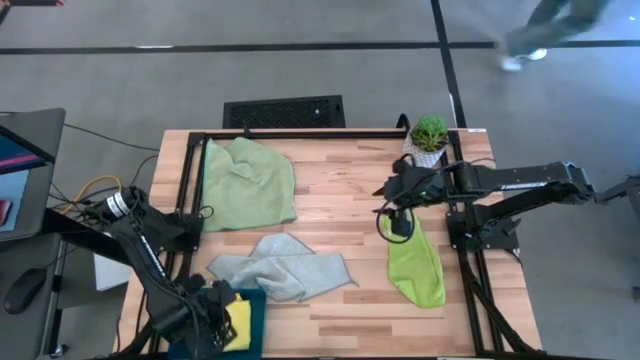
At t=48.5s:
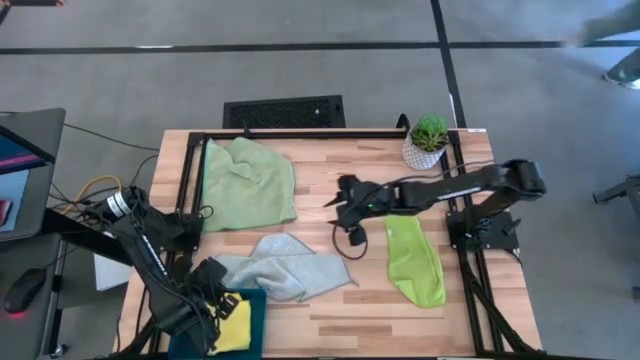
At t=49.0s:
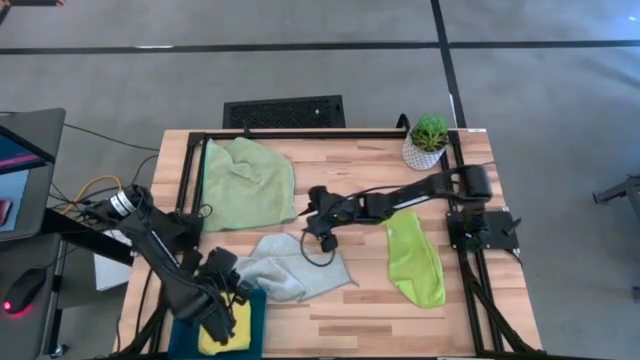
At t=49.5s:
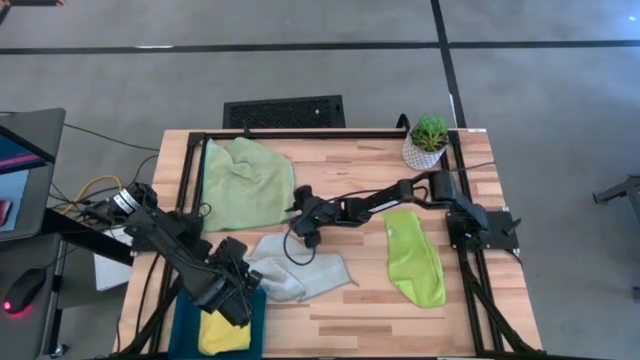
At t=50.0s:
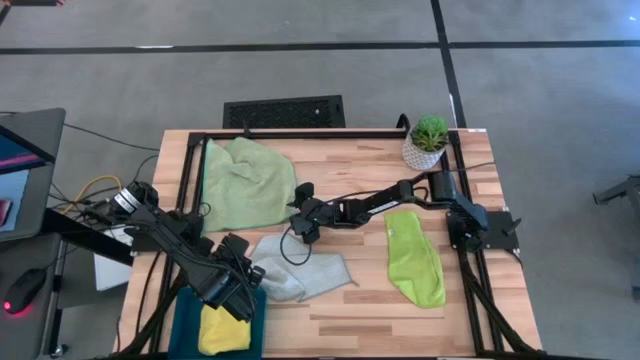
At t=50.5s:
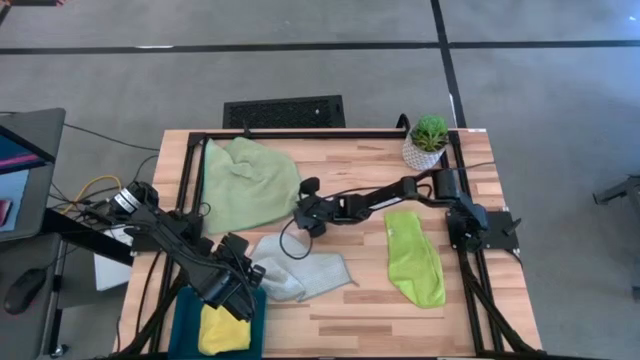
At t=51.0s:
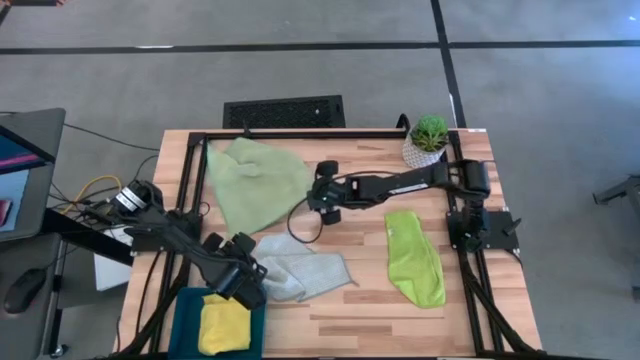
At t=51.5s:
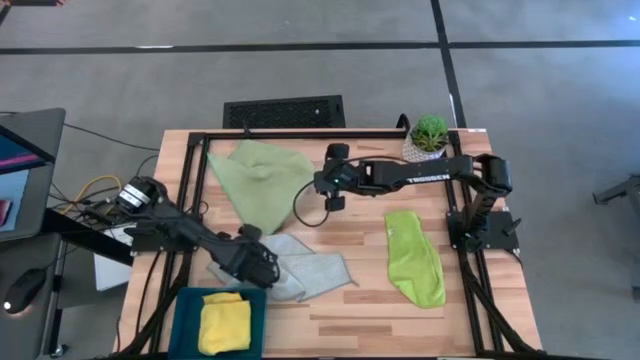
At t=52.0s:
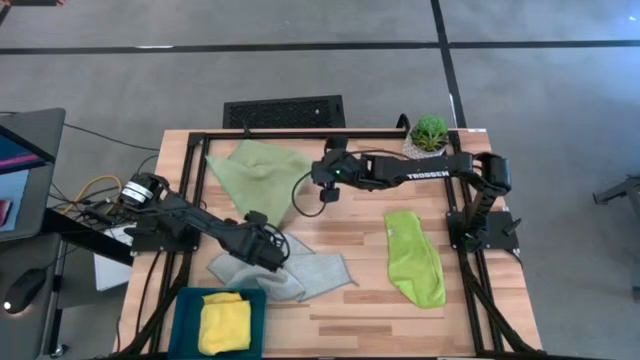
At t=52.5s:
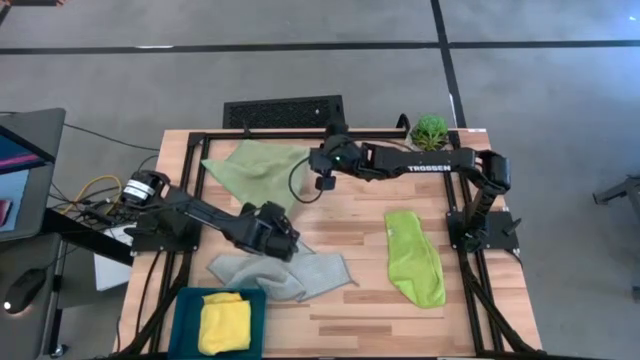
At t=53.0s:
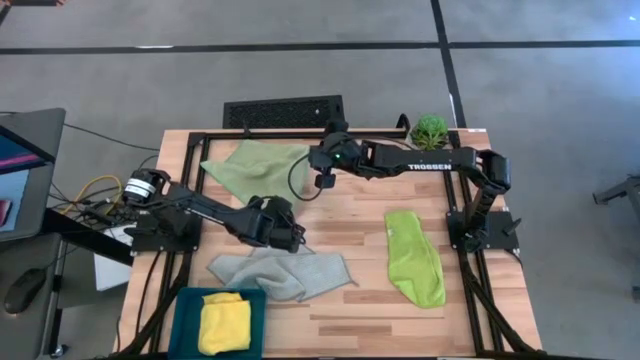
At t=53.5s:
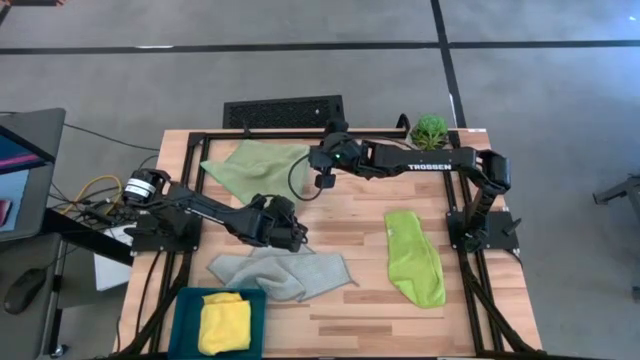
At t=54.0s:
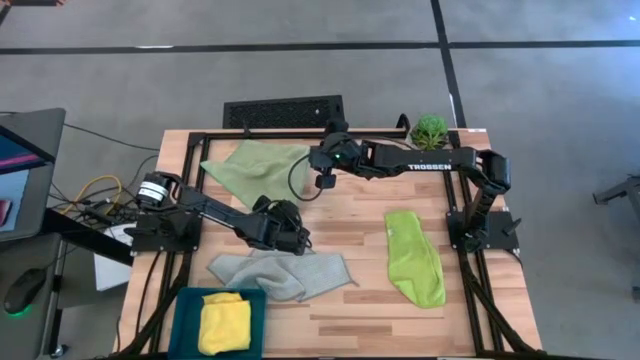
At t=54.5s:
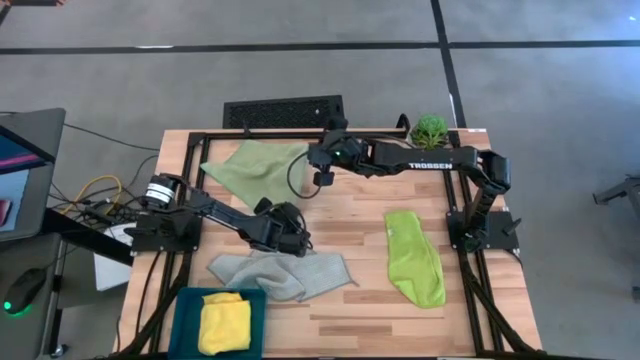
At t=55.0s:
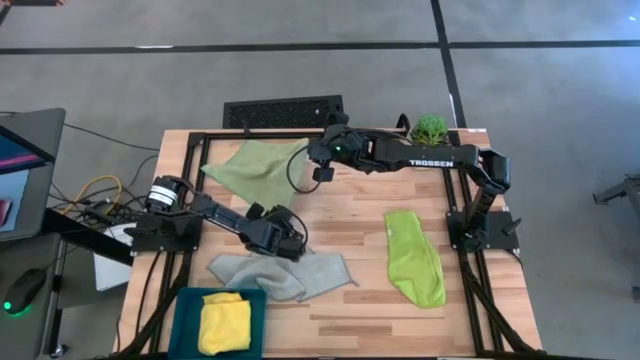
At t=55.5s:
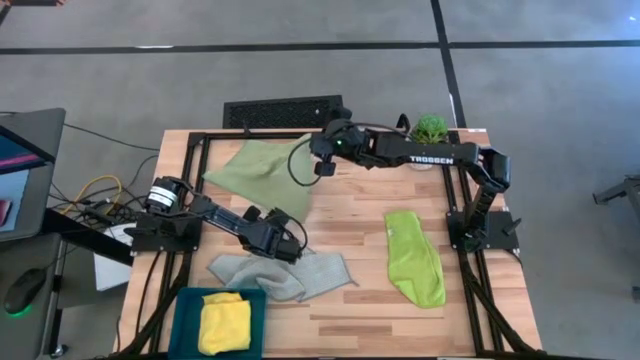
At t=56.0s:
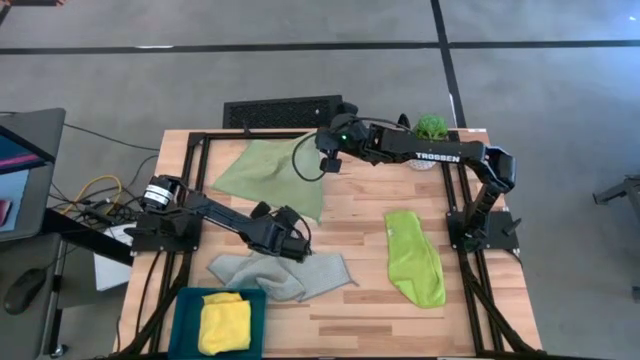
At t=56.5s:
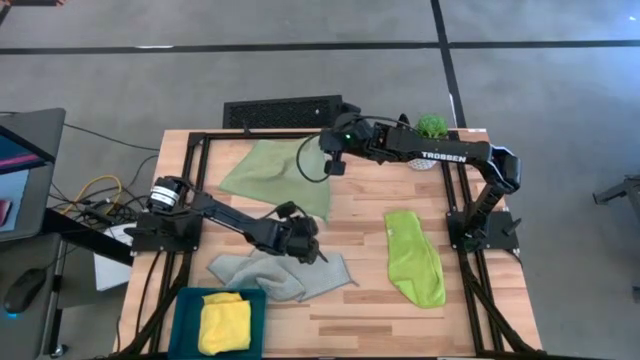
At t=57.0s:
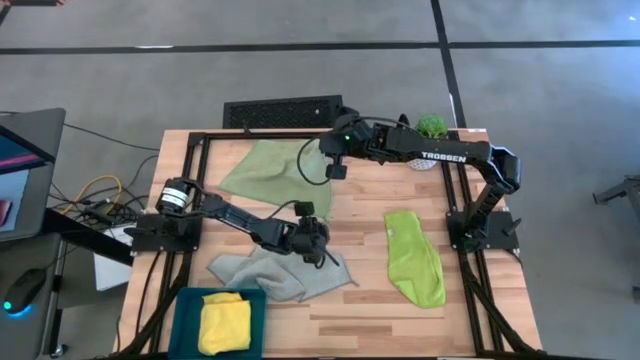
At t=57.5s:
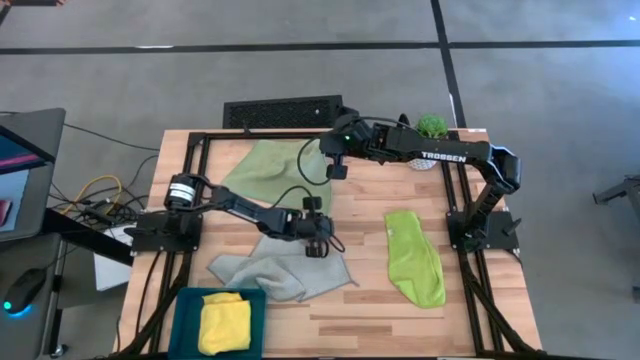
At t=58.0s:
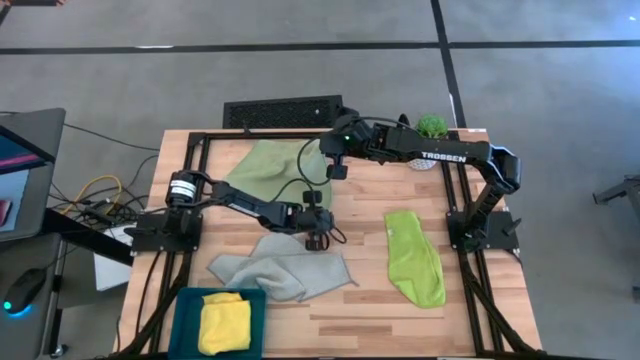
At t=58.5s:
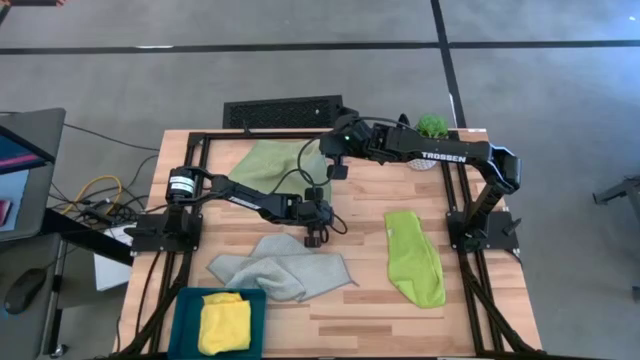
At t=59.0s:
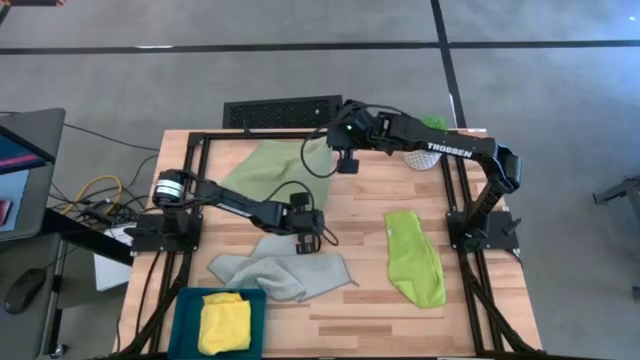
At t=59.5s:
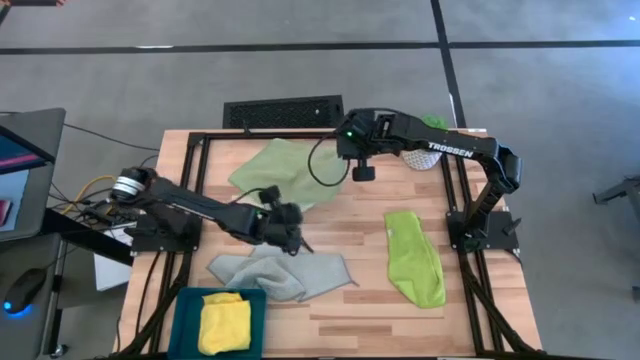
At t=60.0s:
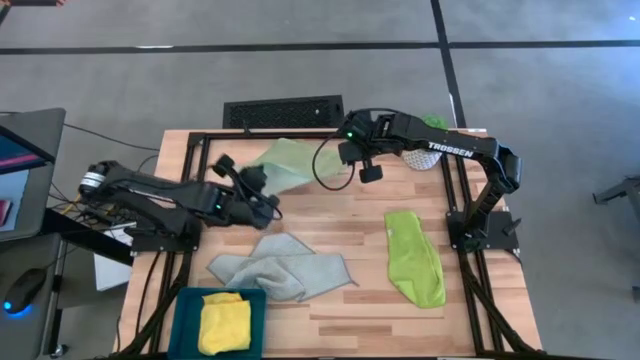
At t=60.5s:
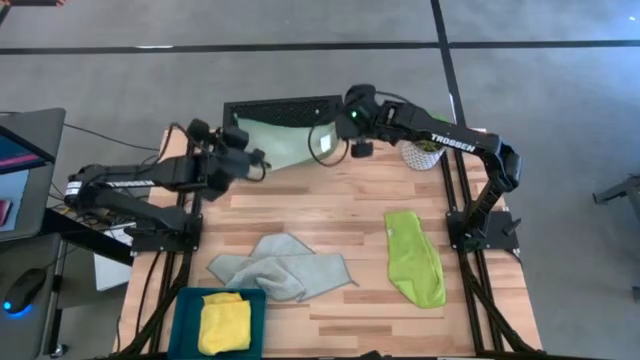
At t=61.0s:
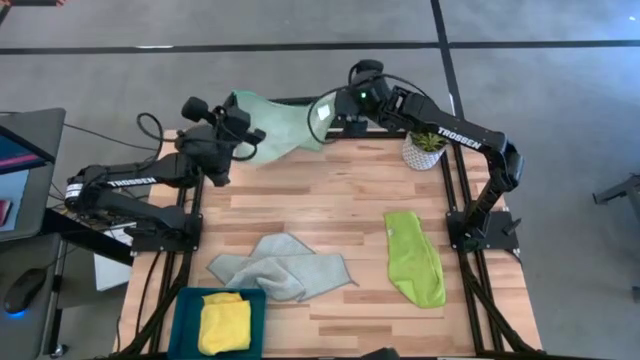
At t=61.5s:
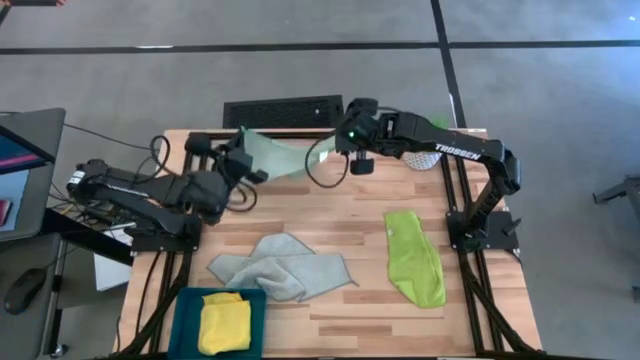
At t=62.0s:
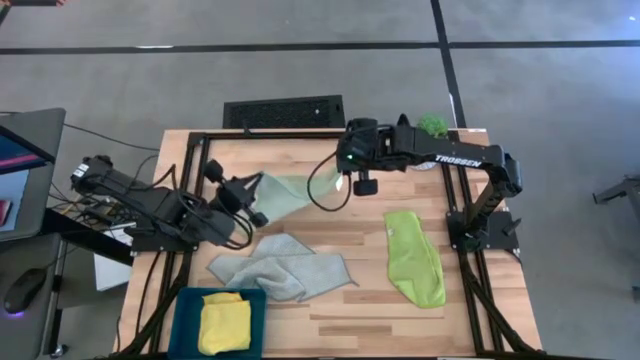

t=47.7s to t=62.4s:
Task: Fold microfiber towels
Fold the light green microfiber cloth

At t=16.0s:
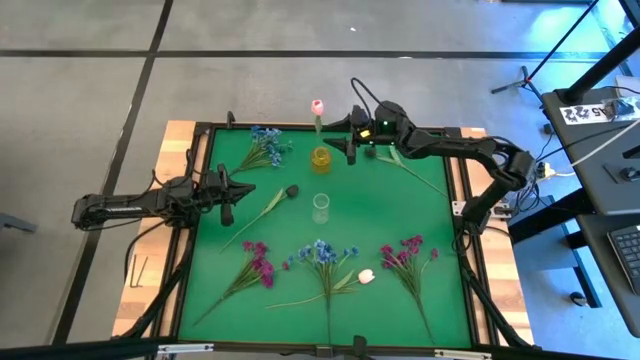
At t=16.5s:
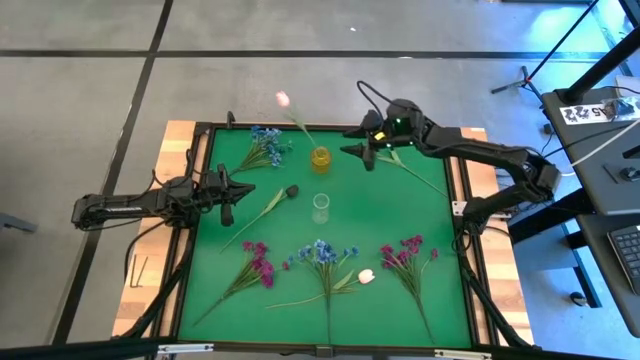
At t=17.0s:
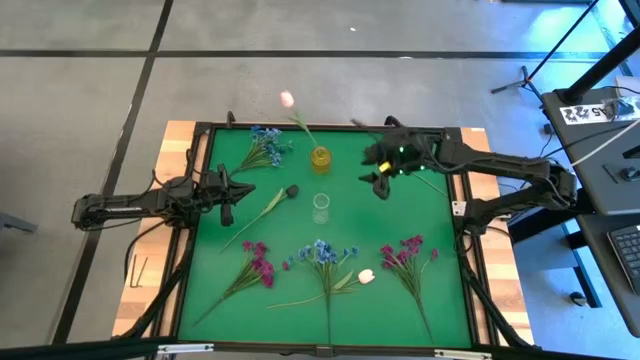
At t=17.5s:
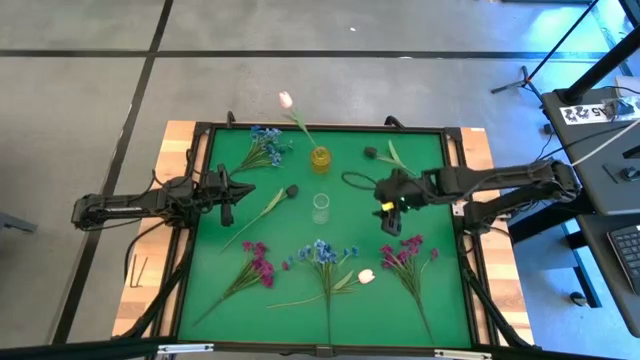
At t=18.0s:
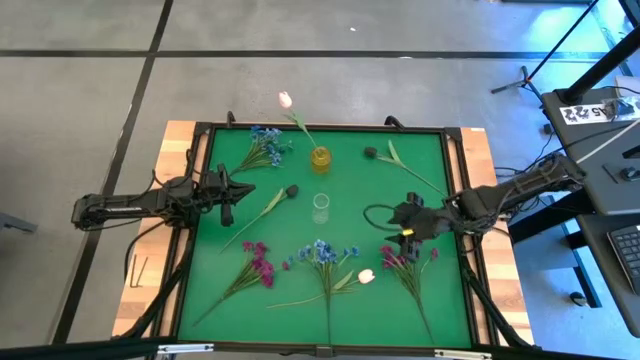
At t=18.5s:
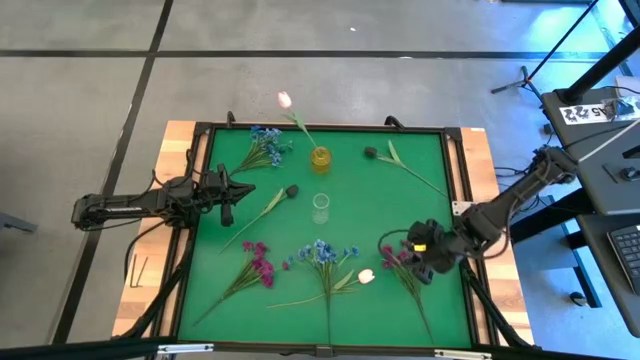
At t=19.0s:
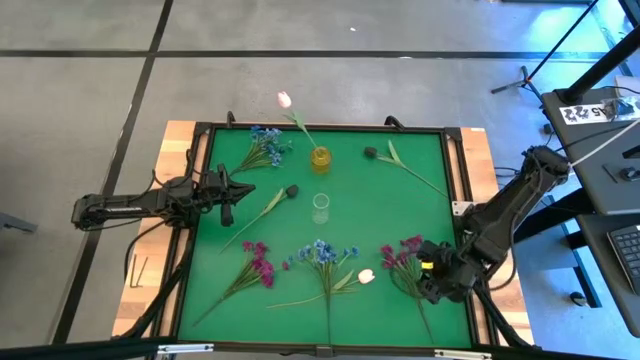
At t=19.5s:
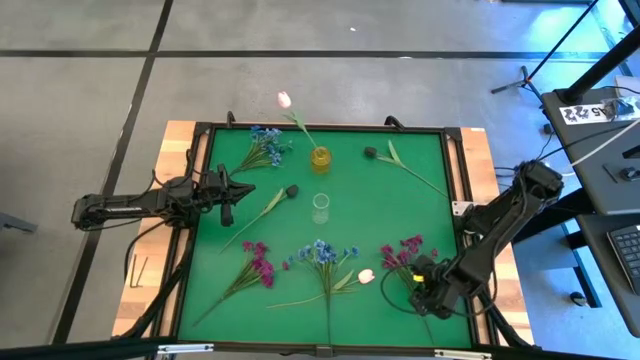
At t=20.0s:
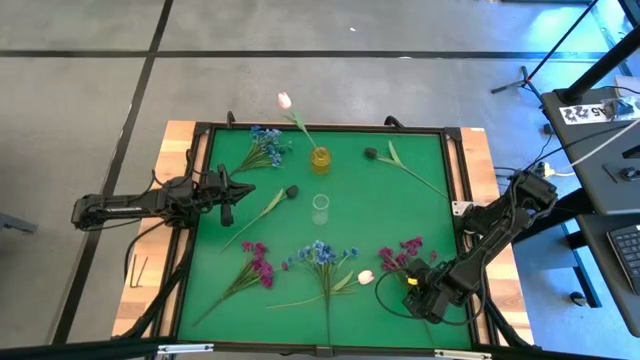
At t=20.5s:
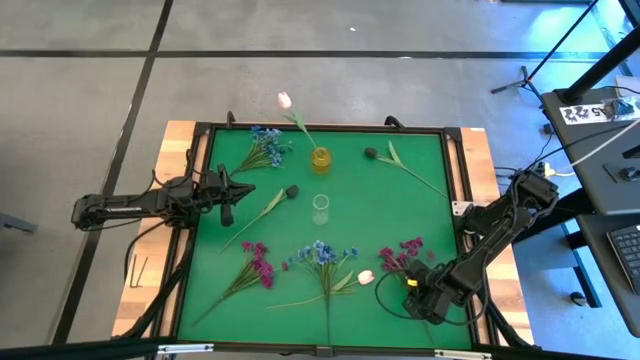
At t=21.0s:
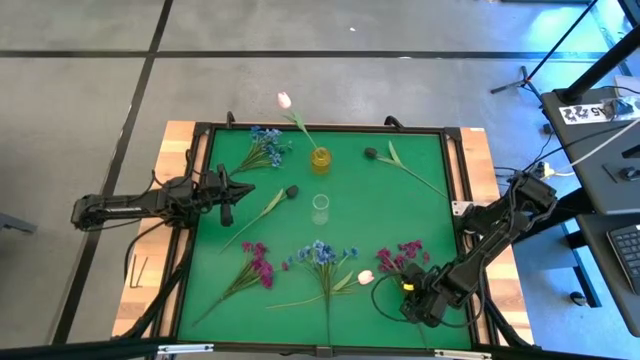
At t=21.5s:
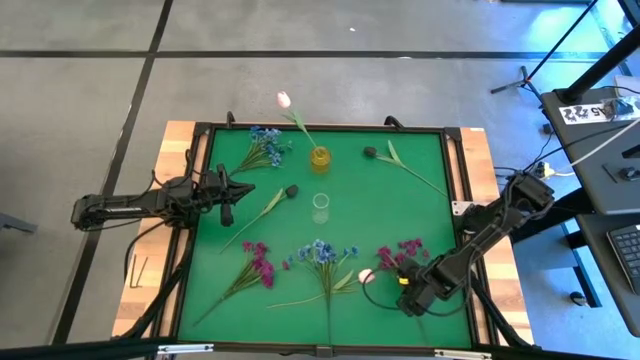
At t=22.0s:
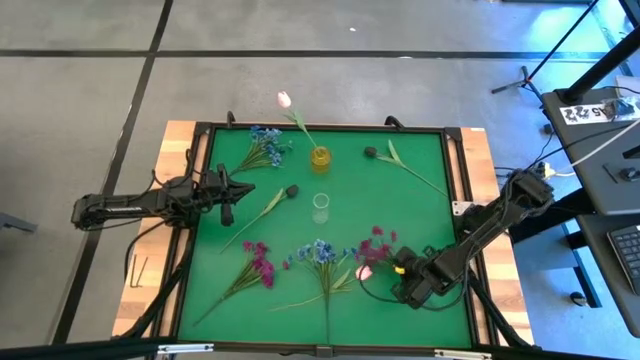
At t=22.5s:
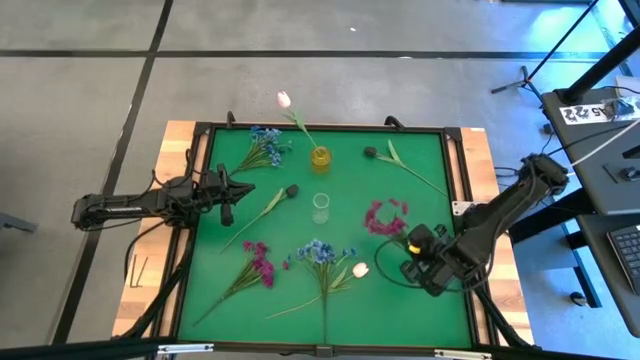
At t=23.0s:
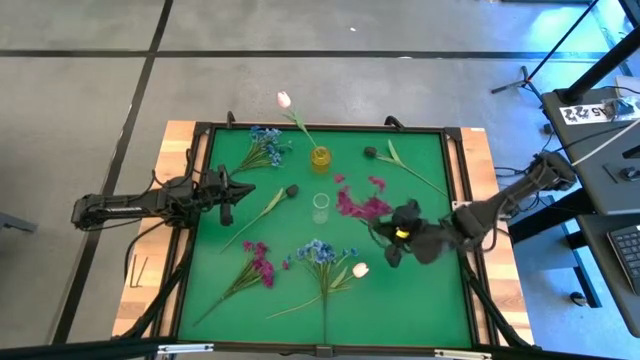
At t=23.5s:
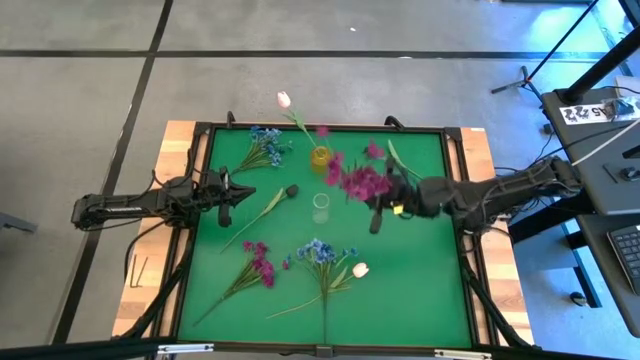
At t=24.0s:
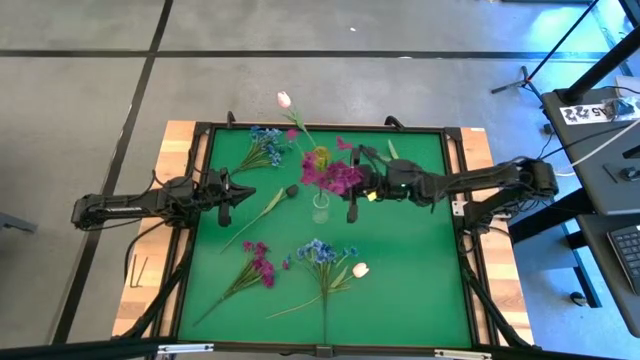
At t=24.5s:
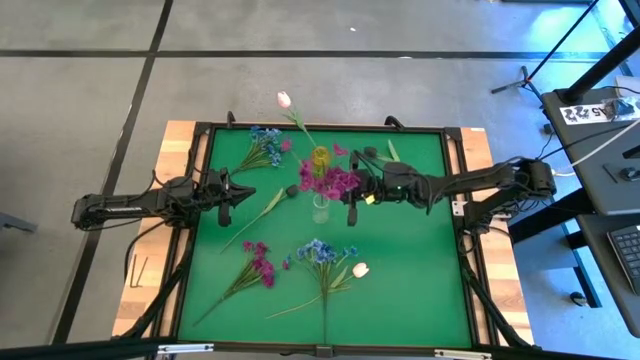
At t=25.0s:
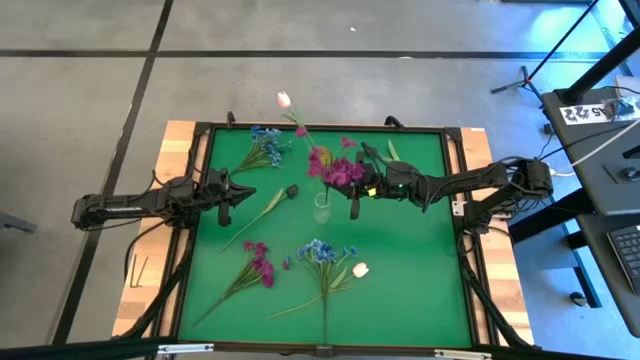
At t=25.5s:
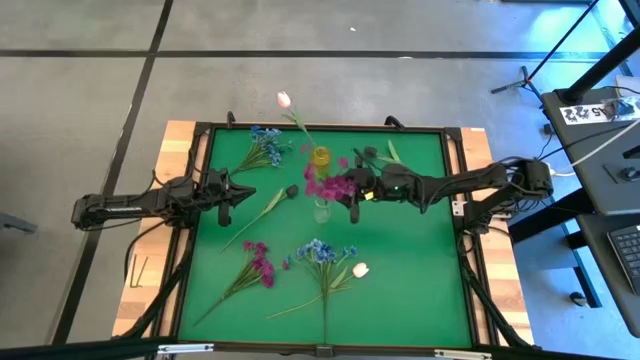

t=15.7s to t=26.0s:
Task: Sort flowers into vase by color
Put the right violet flowers into the transparent vase
